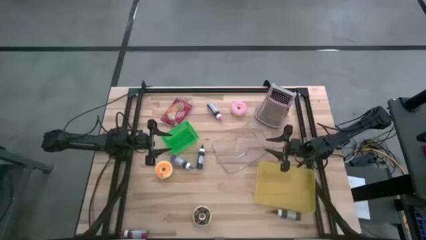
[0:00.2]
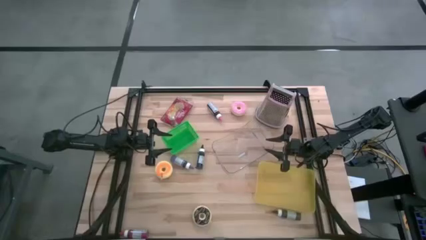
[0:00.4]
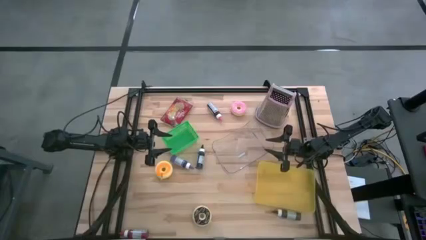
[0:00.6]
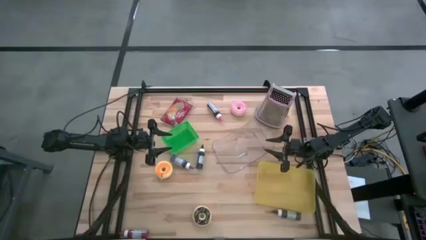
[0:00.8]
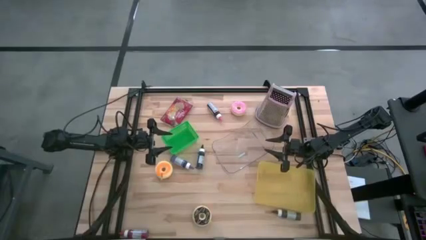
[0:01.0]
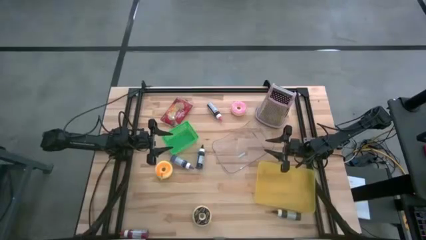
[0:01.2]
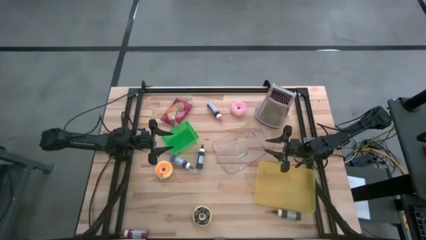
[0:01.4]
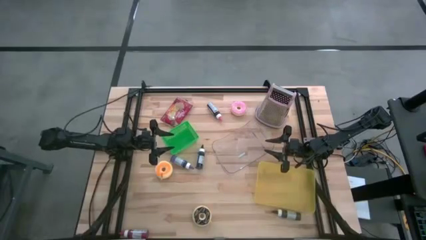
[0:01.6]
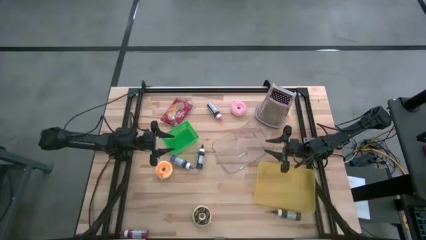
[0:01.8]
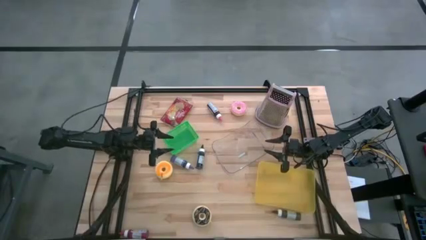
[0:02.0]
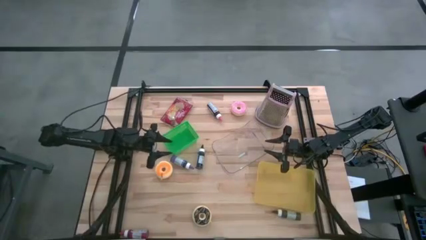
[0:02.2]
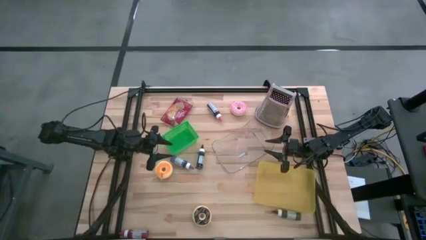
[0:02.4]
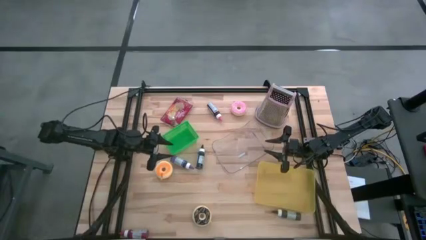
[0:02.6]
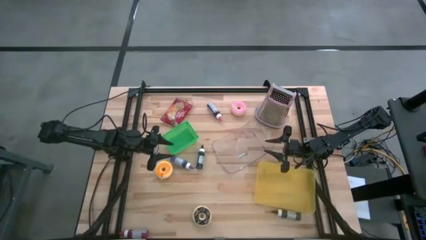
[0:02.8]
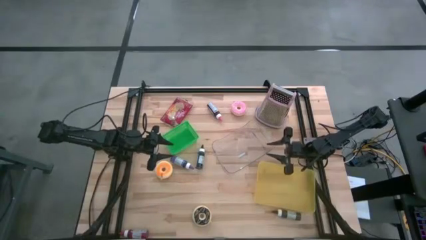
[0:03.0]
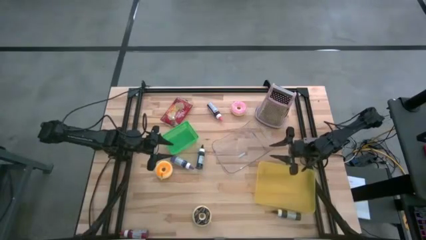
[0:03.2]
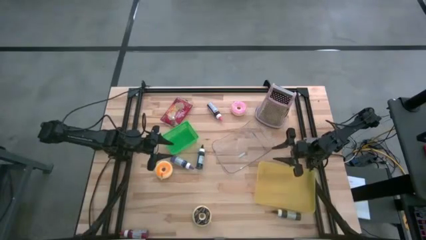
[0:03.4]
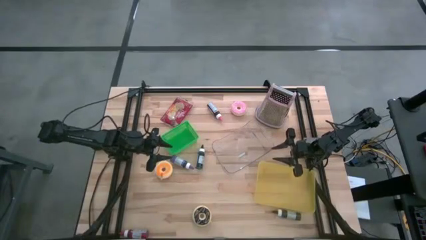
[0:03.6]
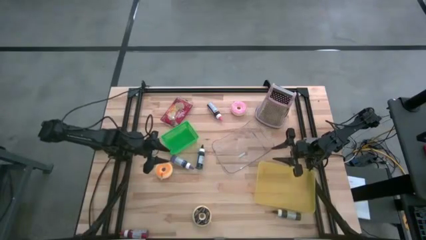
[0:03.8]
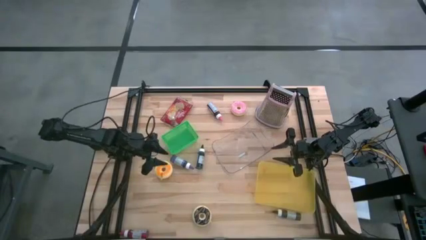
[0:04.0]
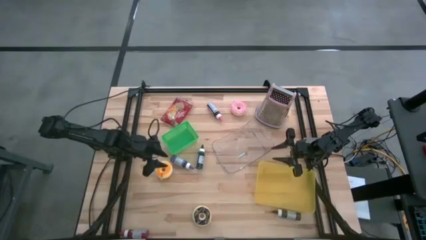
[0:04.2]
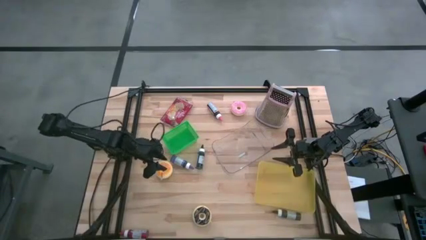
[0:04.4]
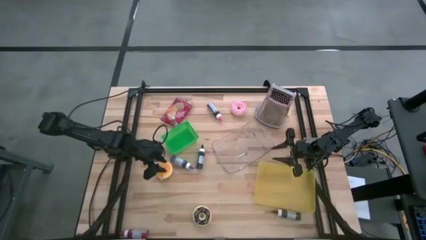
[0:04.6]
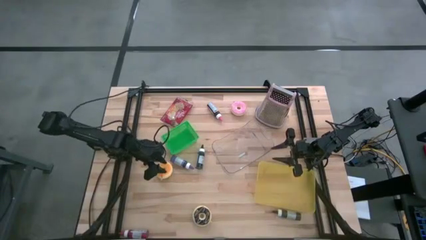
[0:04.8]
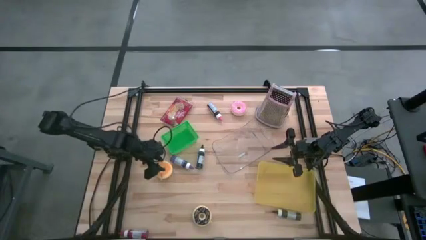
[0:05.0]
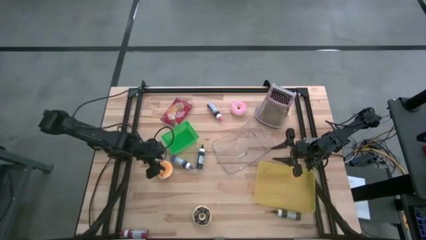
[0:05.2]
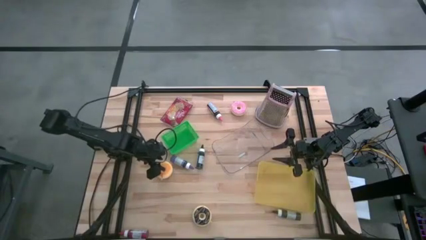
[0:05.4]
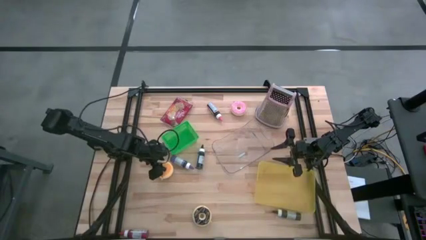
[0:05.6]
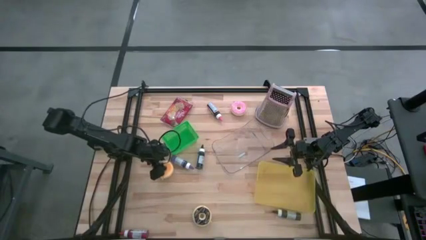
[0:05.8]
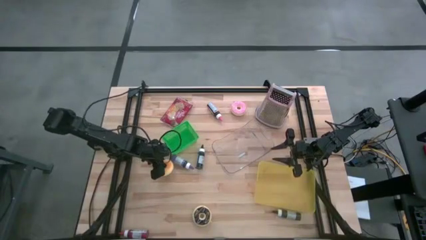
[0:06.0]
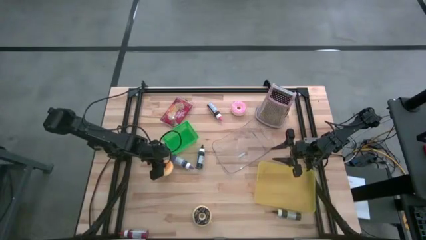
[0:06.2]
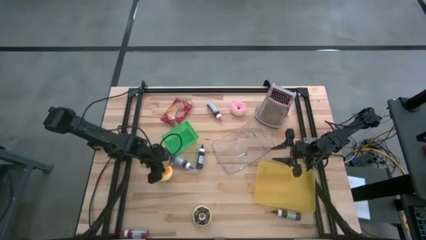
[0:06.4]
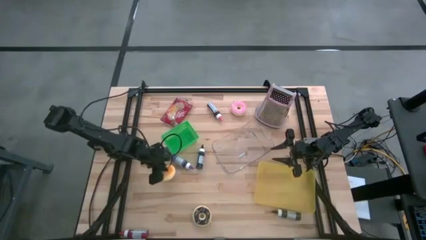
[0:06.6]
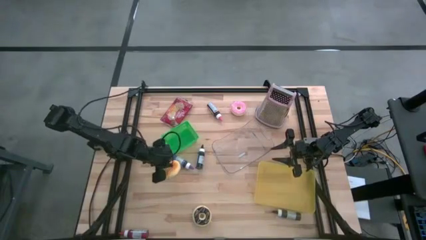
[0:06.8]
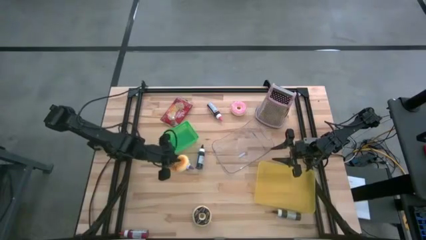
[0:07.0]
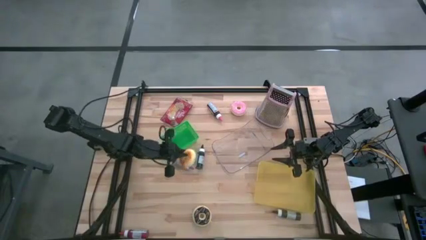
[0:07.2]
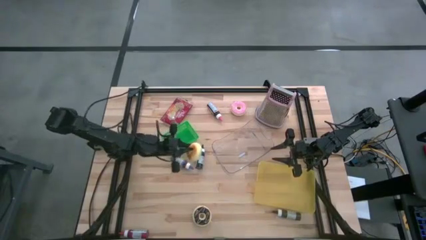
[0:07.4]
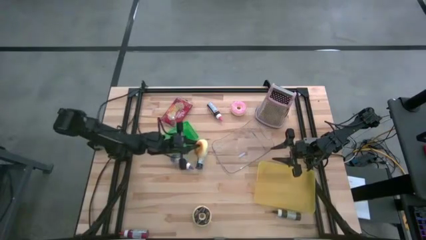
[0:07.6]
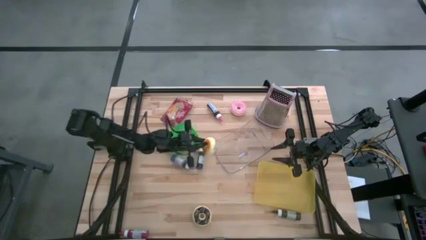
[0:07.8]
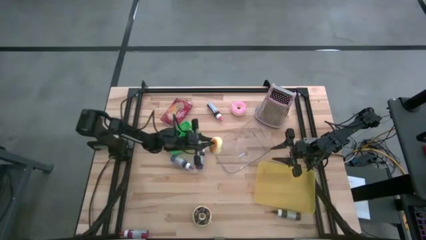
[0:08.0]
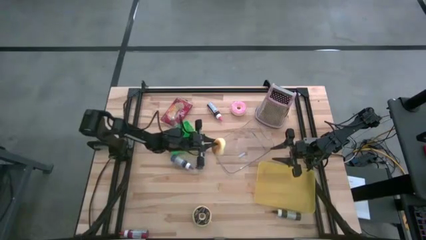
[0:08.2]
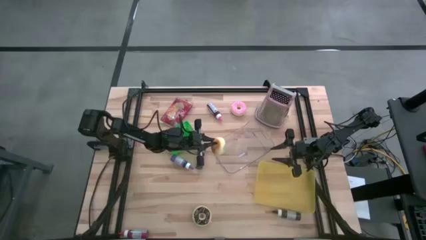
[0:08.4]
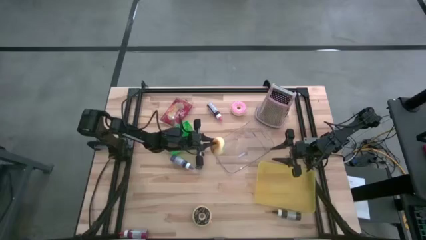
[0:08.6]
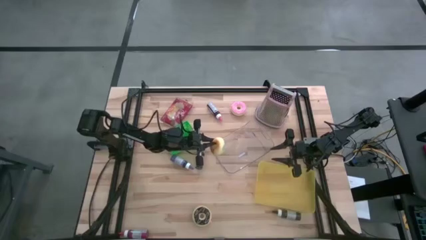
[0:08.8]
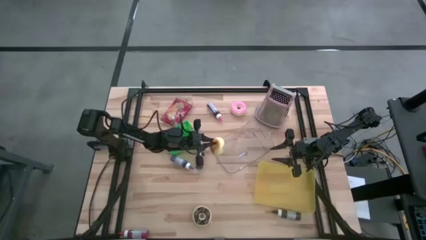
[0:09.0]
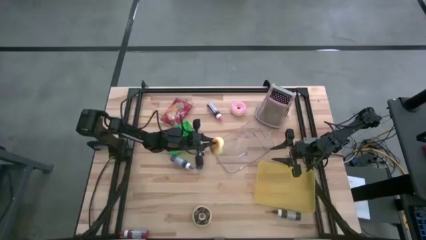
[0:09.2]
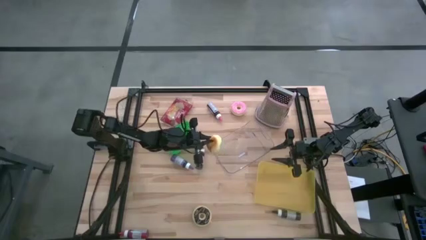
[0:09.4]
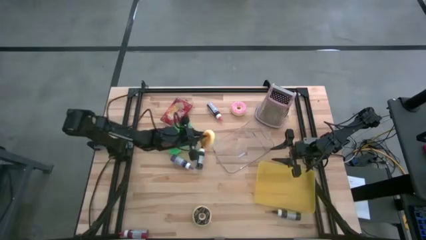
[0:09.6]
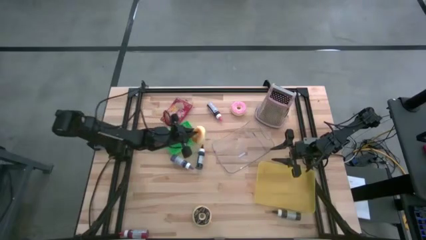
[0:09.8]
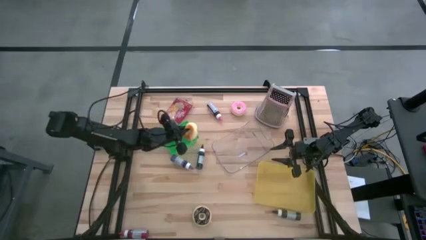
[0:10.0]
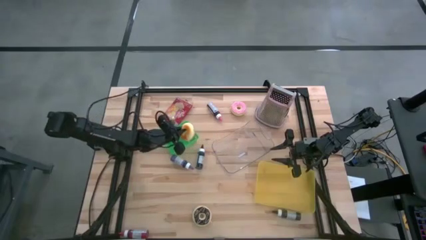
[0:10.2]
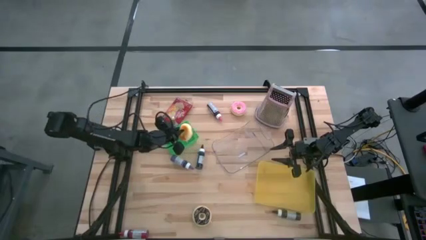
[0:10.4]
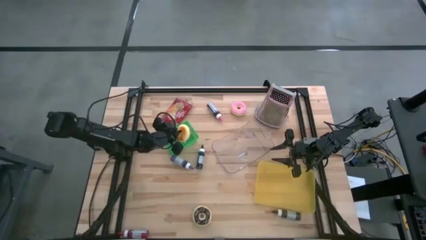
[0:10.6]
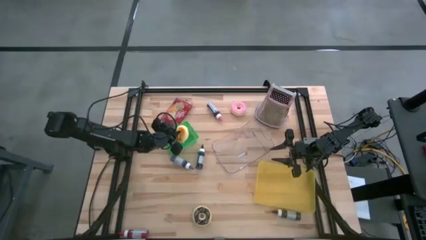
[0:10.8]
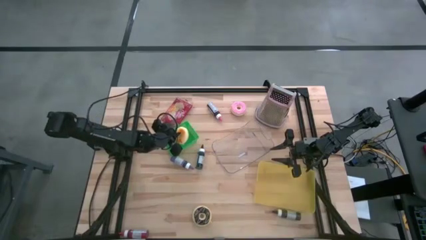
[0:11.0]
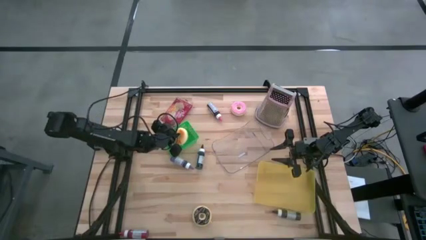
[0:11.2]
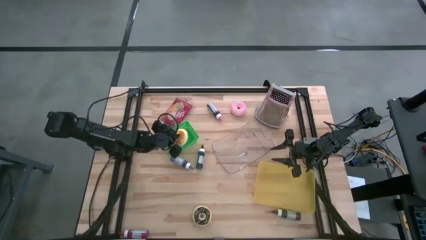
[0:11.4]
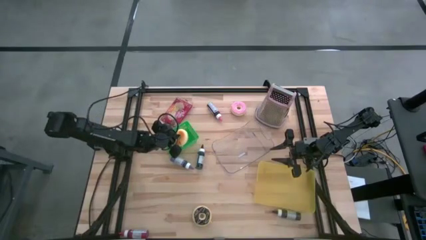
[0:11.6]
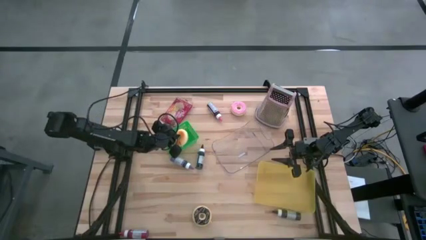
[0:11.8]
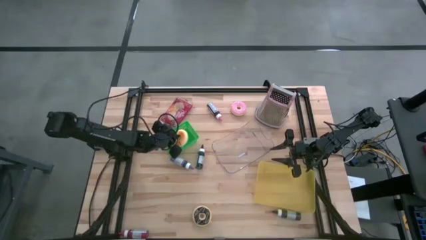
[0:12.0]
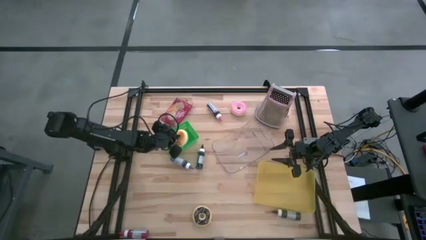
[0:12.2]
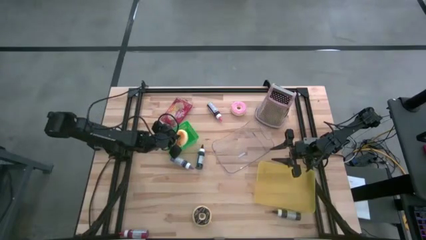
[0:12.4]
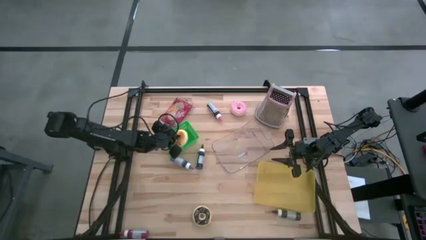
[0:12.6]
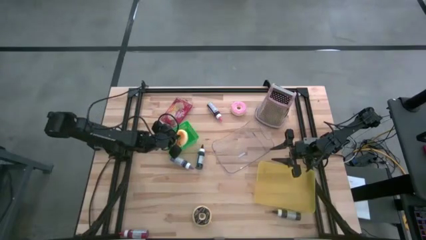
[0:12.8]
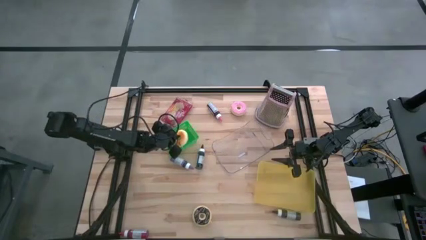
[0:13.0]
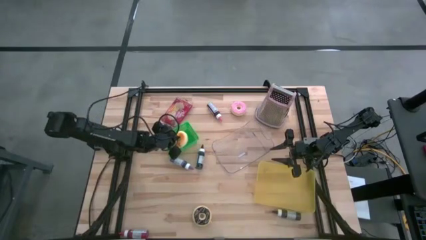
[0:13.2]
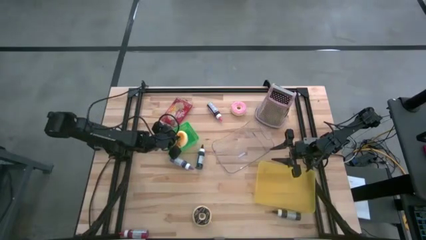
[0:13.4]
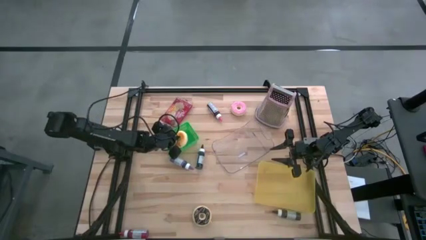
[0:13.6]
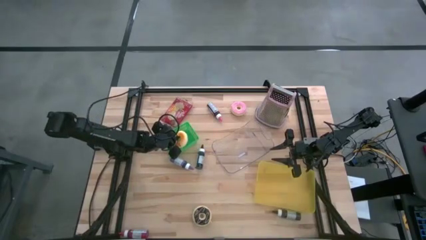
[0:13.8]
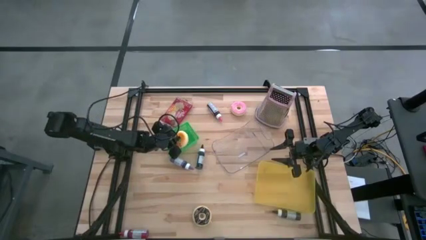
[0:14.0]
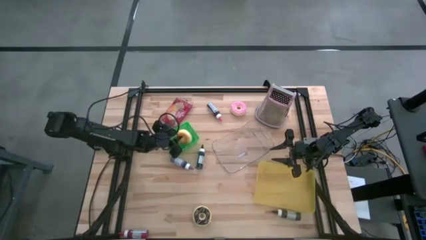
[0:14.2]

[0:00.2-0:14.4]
Task: Pick & Place Food Item
Put the yellow donut into the green bin
